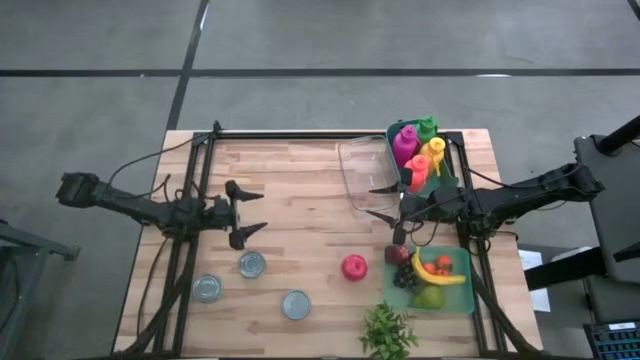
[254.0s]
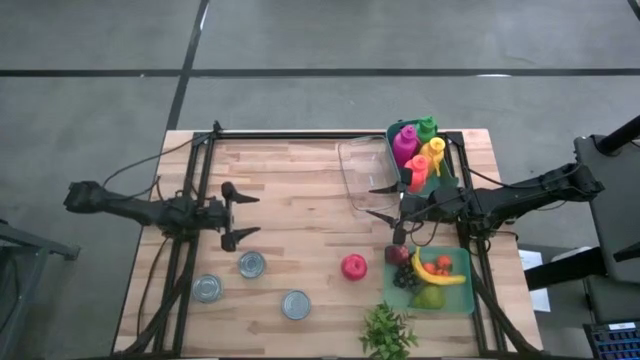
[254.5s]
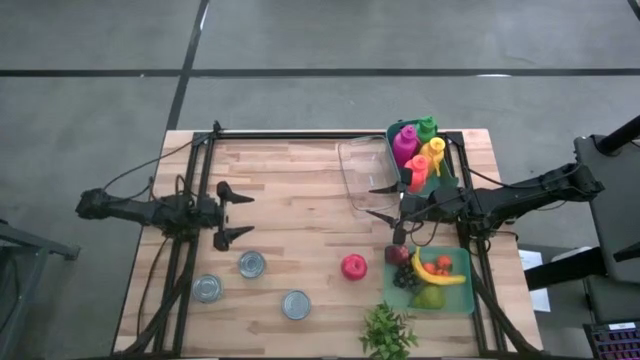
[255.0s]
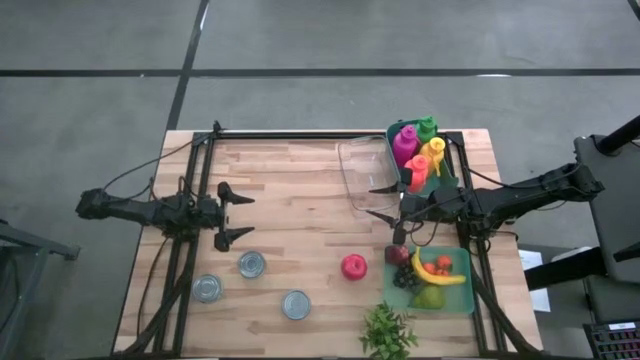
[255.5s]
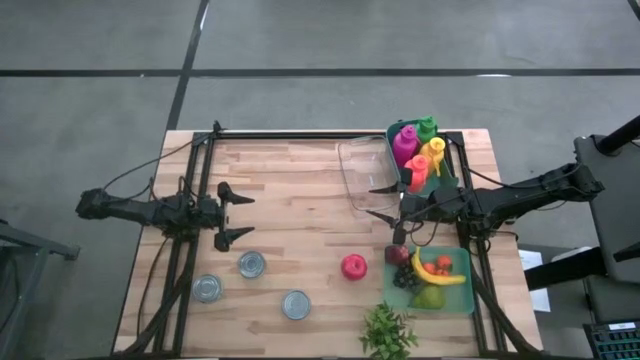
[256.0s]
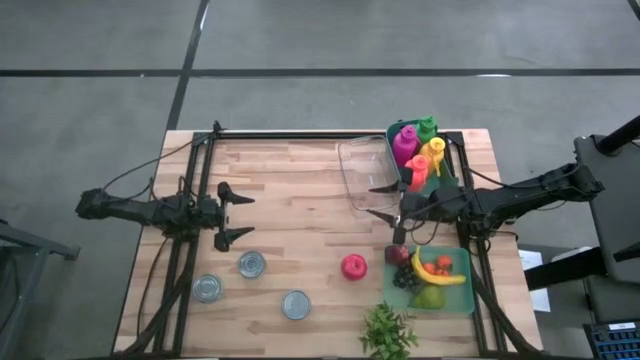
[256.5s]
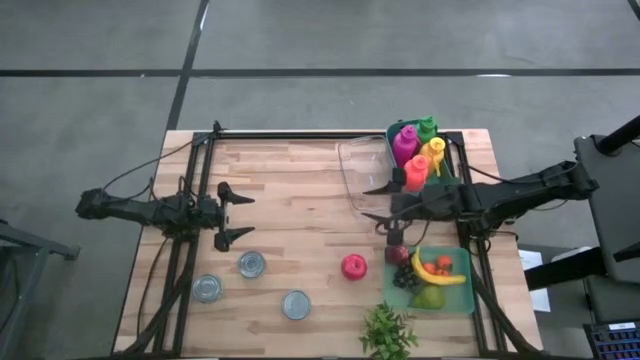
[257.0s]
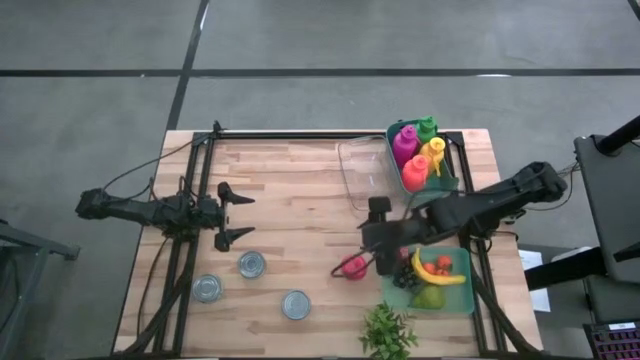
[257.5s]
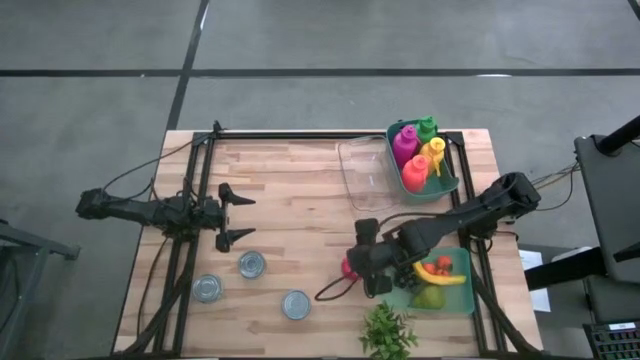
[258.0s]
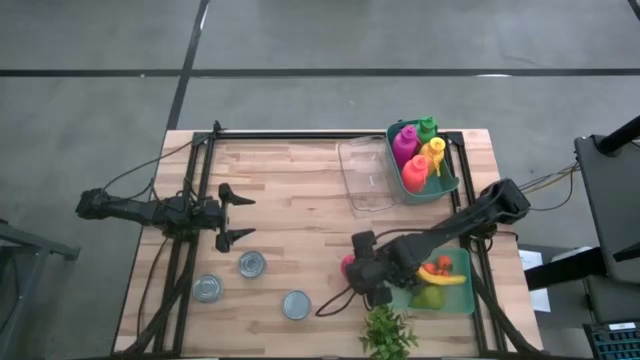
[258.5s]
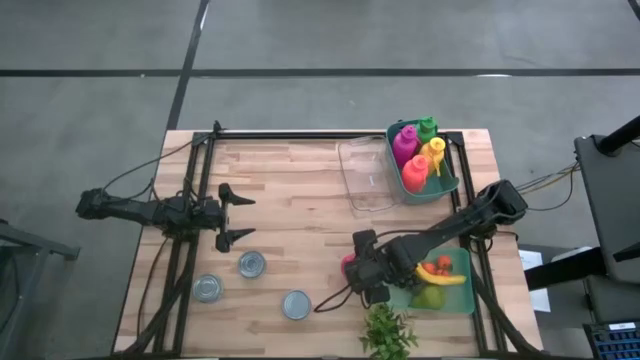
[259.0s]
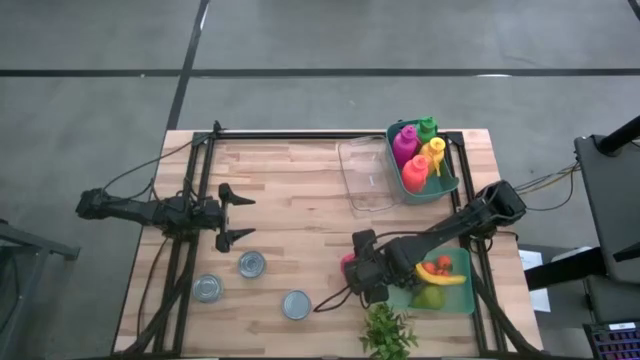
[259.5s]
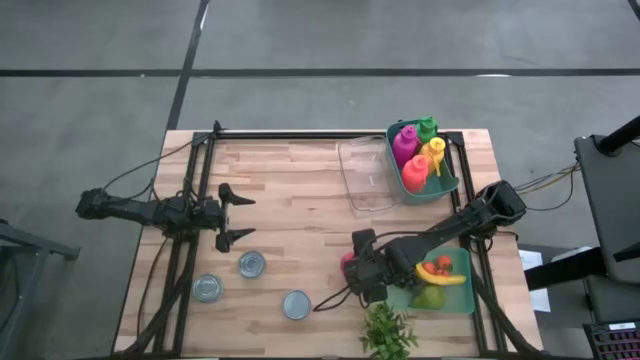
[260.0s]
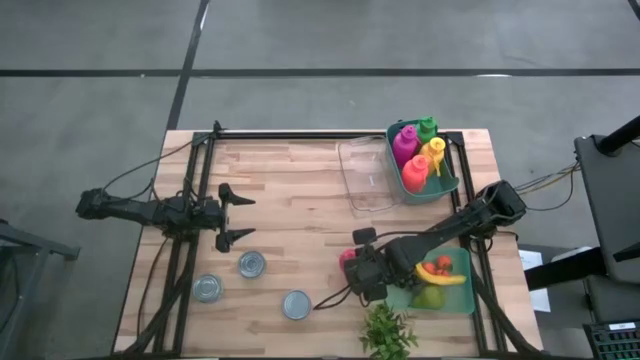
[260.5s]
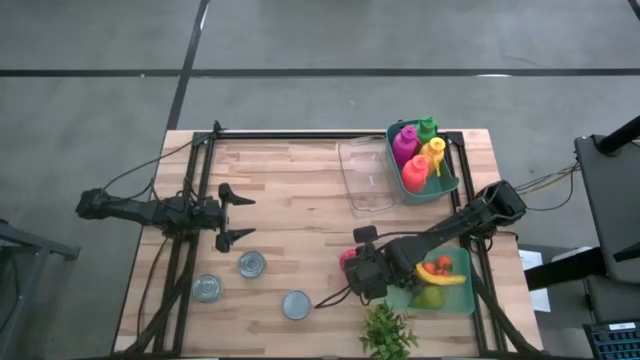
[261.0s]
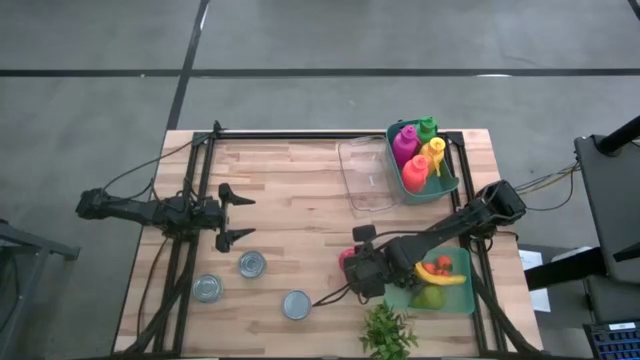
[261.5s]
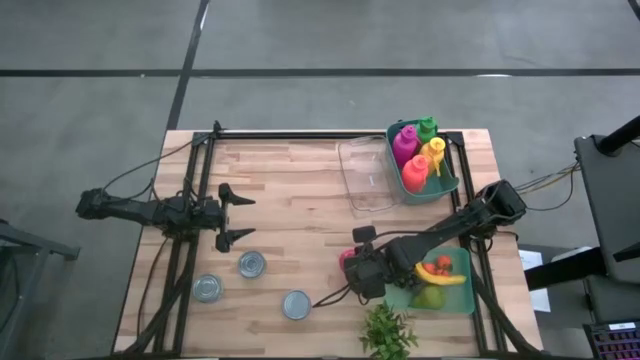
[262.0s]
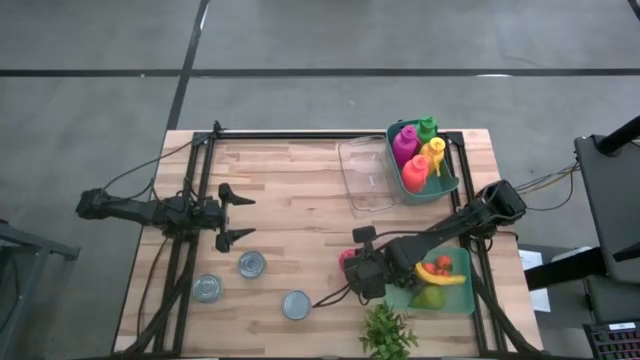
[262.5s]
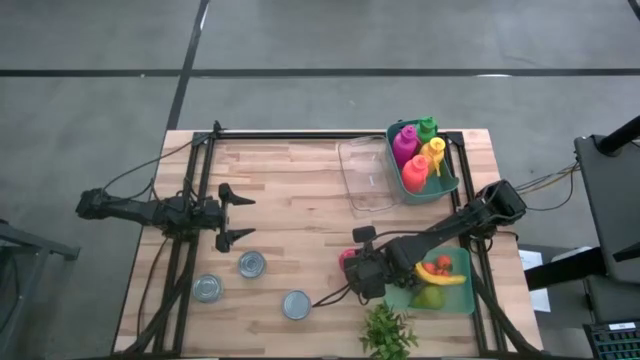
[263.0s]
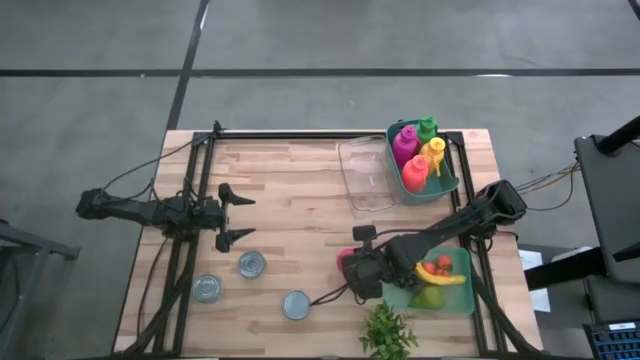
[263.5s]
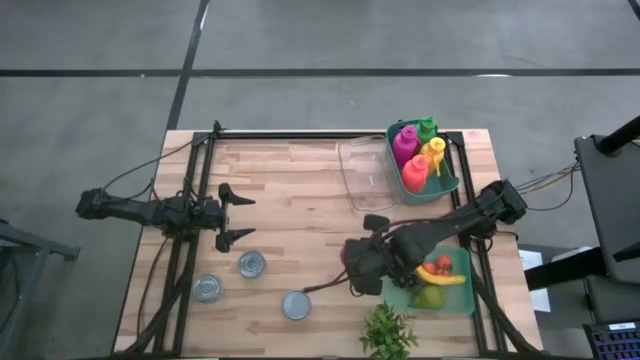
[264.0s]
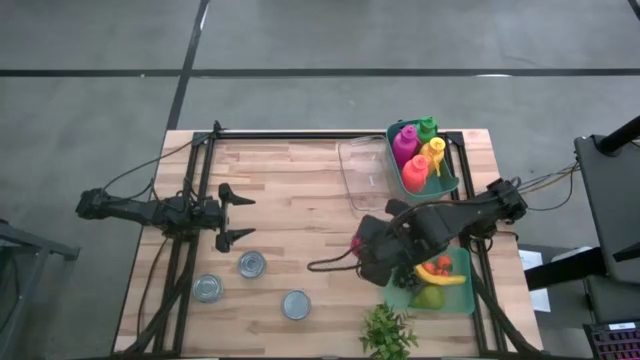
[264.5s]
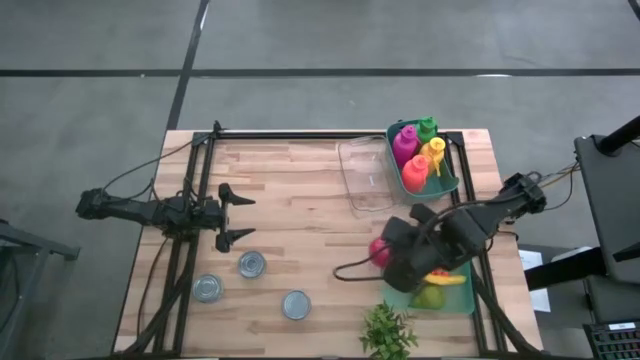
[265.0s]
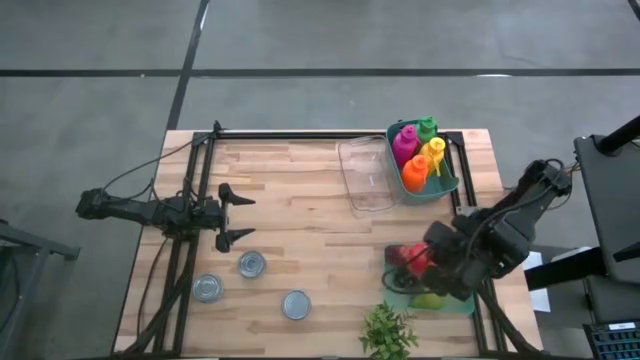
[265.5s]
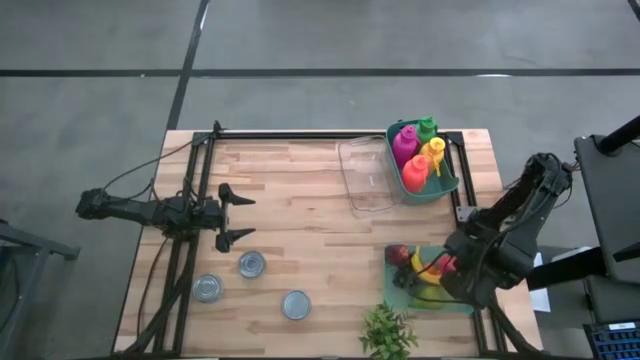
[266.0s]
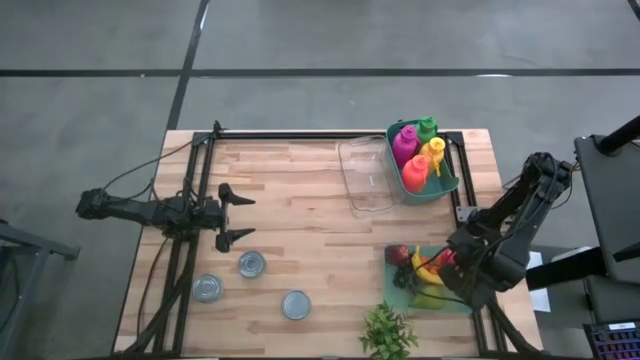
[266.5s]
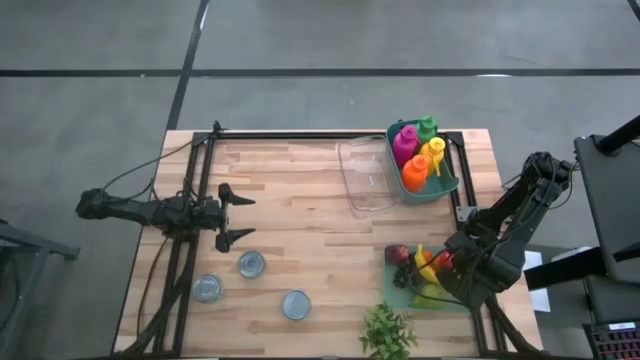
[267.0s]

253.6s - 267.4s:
Task: Pick & Place Food Item
Put the red apple into the green transparent bin

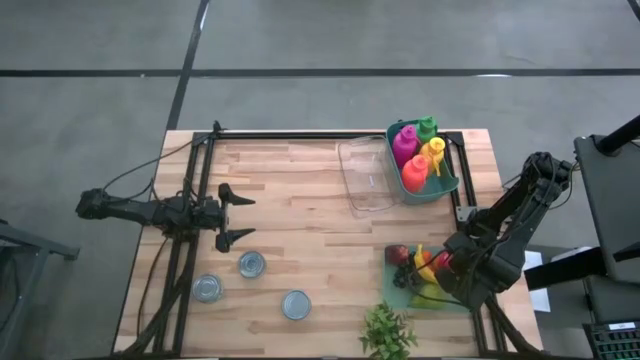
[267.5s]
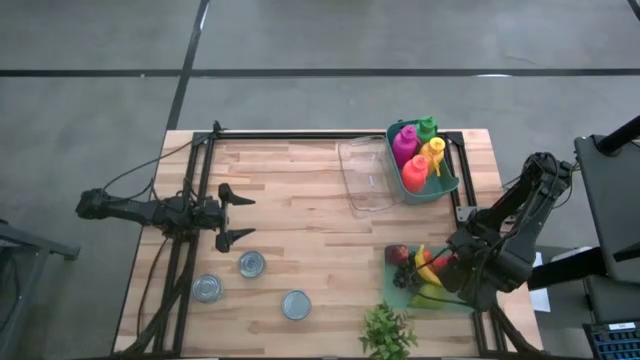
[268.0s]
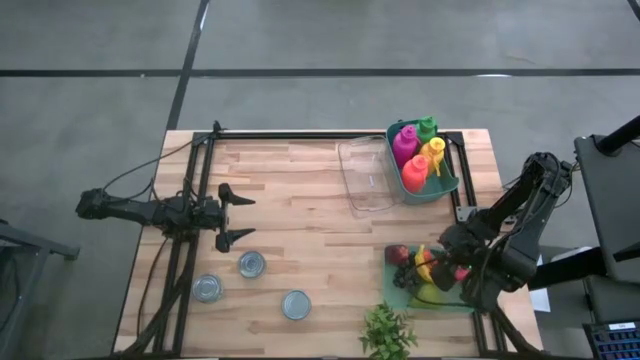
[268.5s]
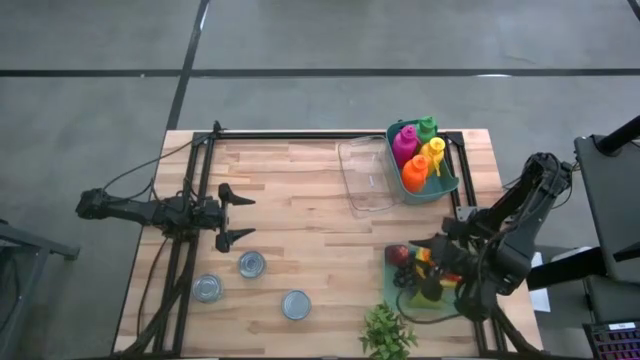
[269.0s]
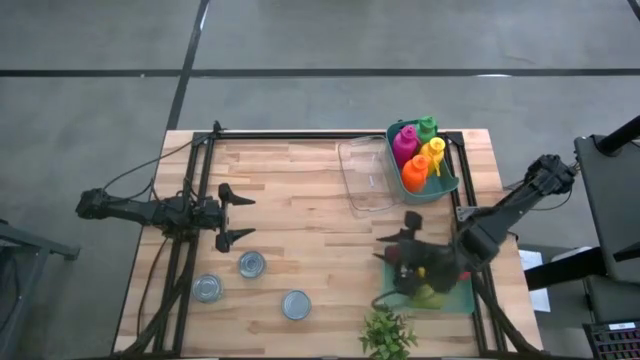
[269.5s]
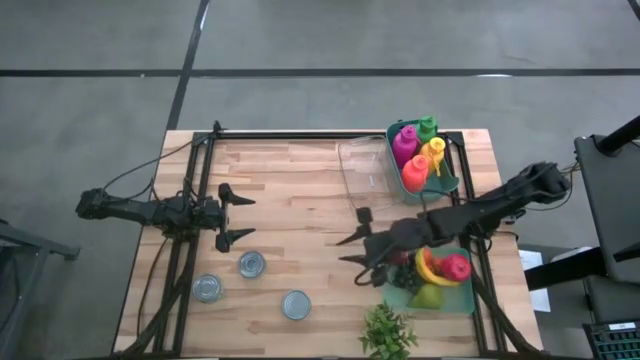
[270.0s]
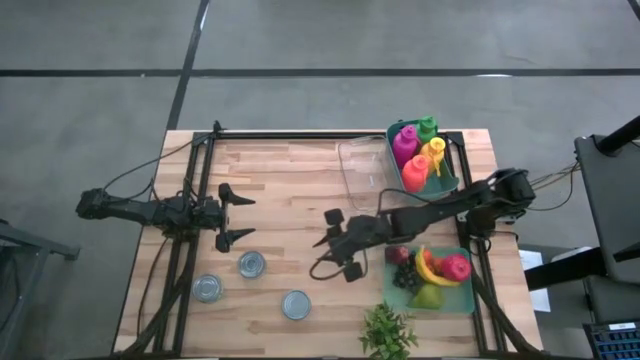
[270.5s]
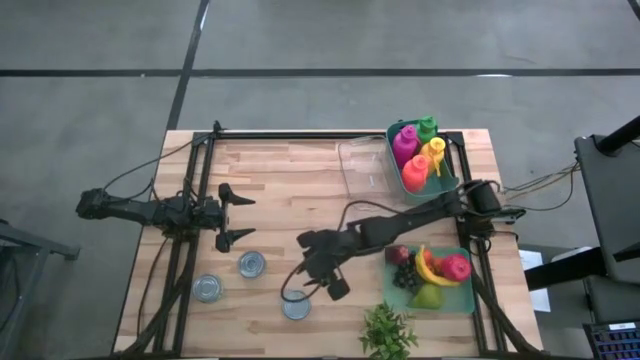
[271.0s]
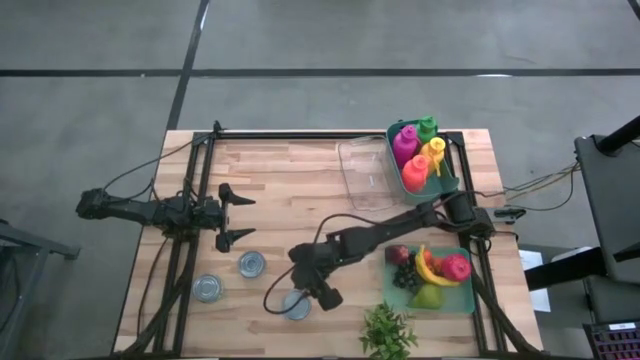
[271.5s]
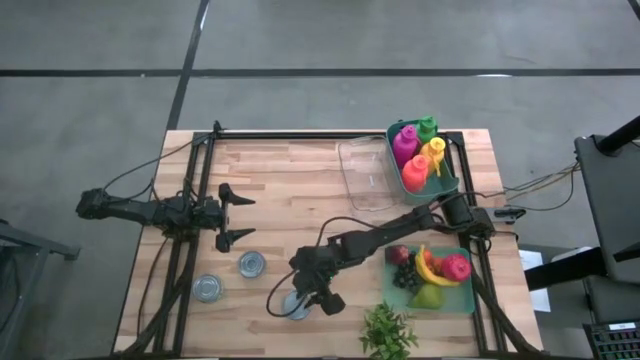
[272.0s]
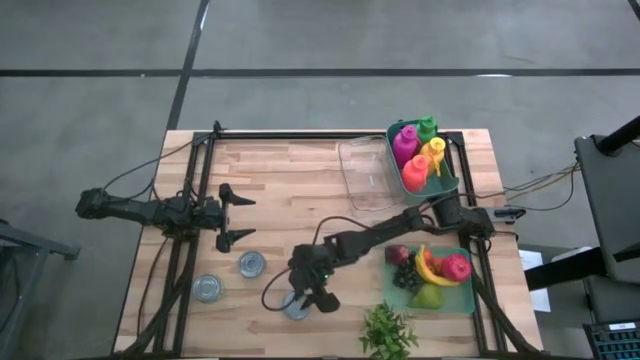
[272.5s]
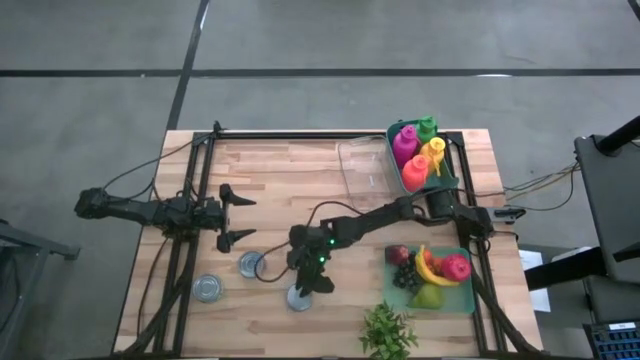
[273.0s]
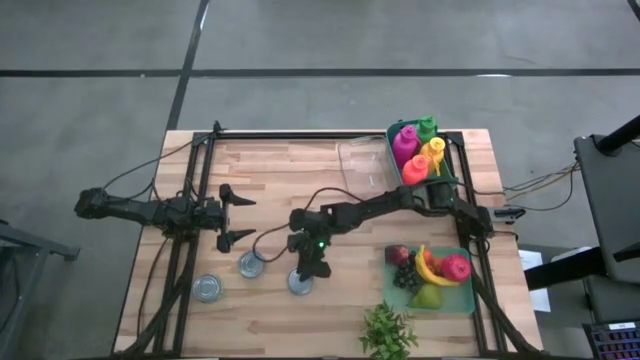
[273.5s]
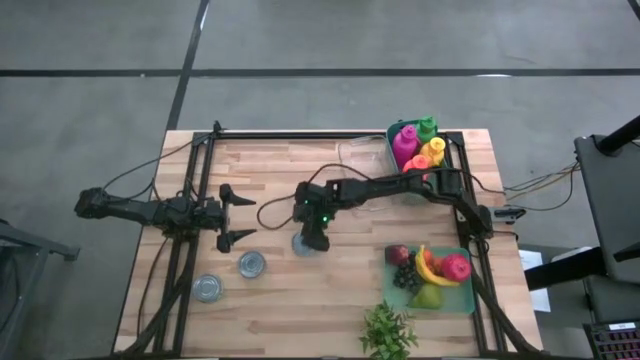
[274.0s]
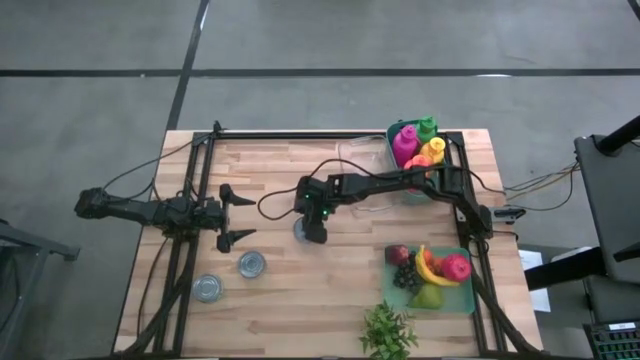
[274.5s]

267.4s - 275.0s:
Move the red tuna can to the center of the table
